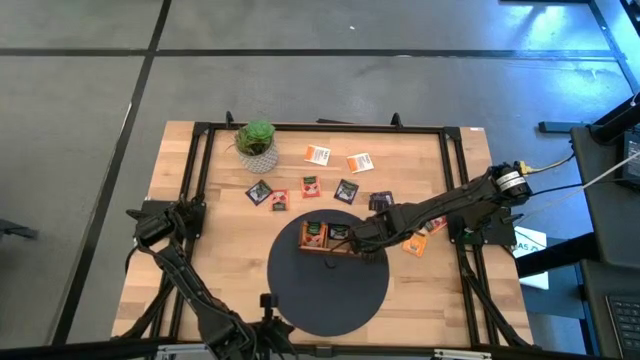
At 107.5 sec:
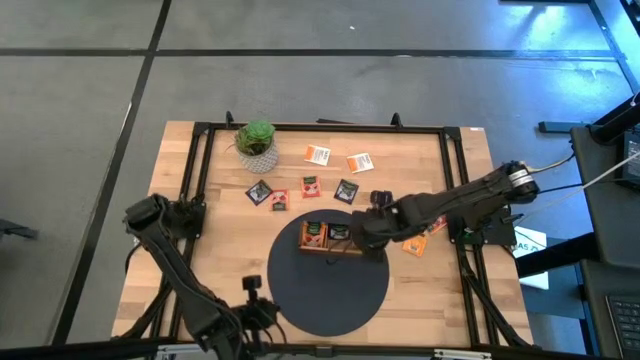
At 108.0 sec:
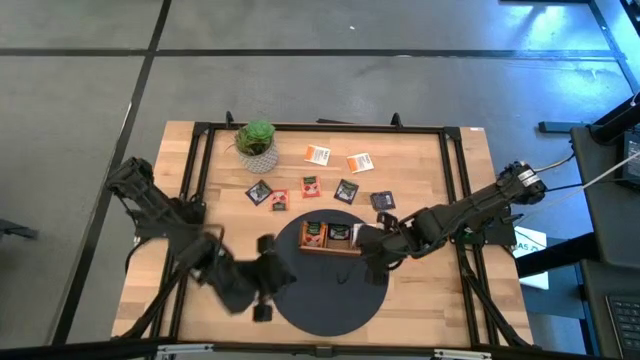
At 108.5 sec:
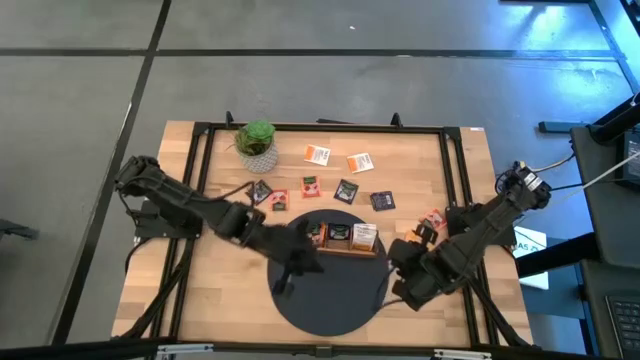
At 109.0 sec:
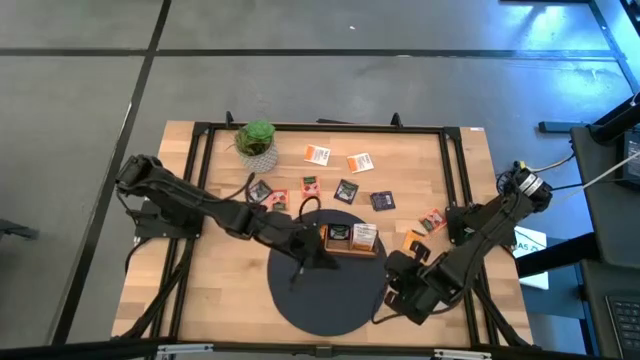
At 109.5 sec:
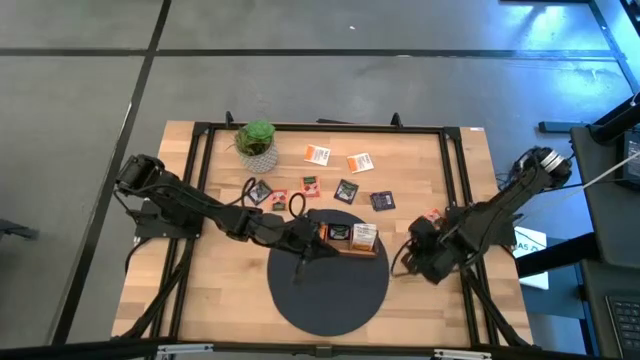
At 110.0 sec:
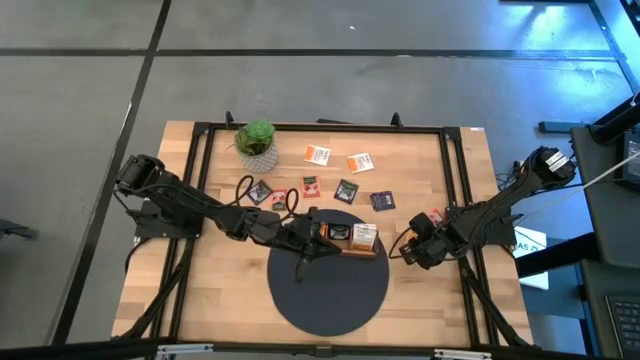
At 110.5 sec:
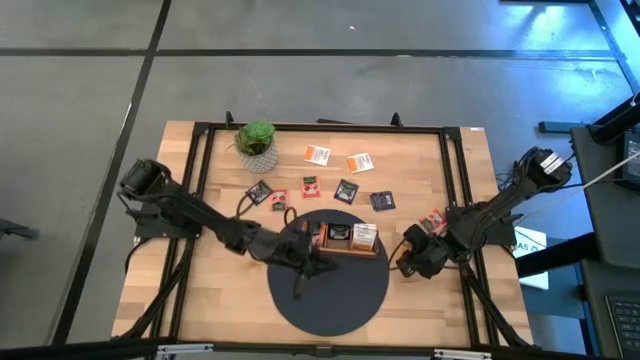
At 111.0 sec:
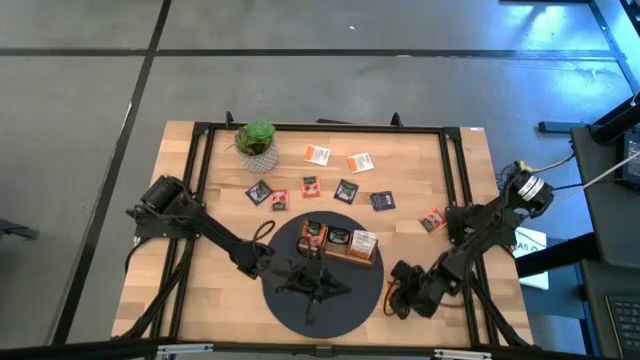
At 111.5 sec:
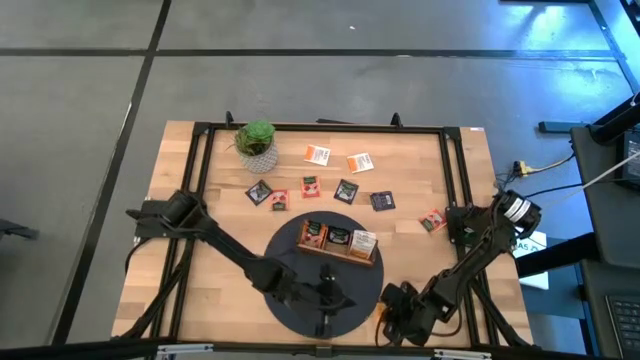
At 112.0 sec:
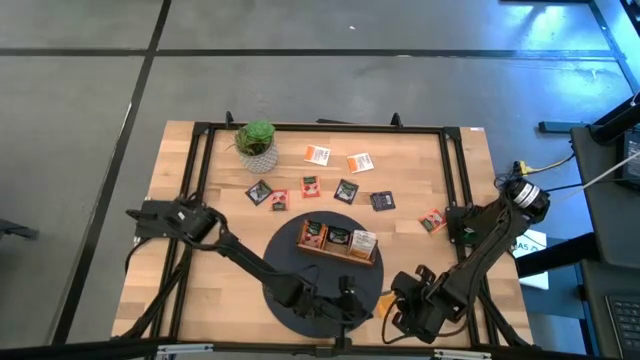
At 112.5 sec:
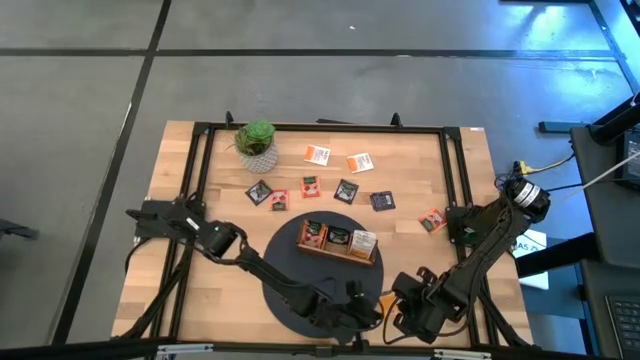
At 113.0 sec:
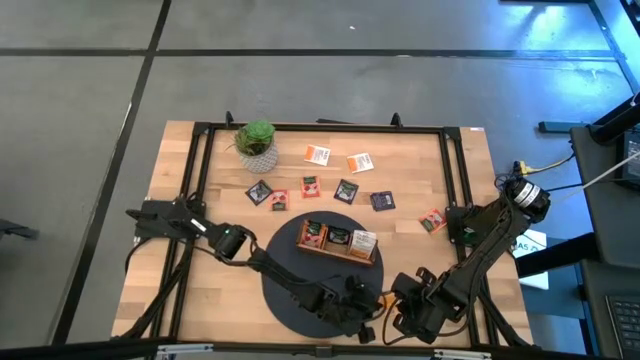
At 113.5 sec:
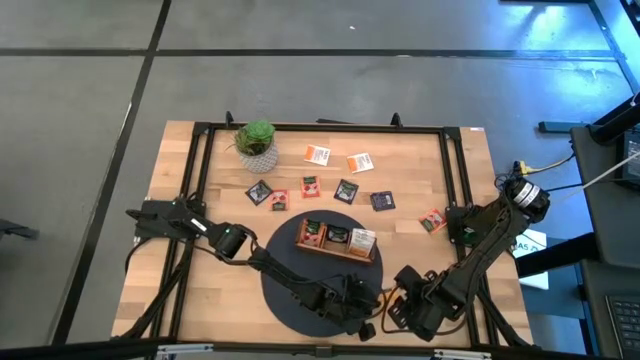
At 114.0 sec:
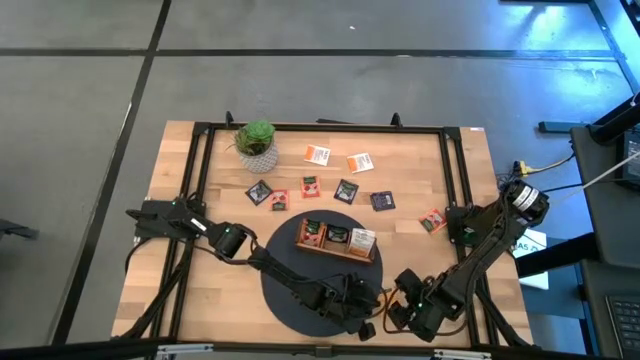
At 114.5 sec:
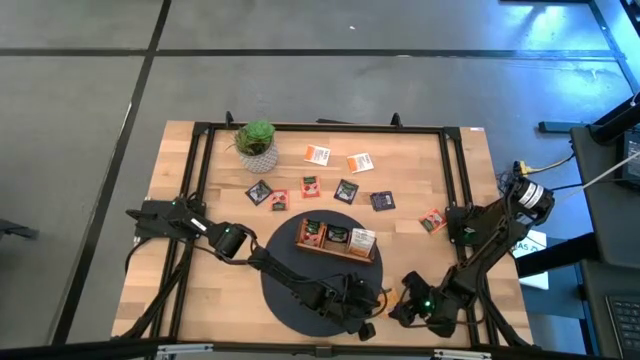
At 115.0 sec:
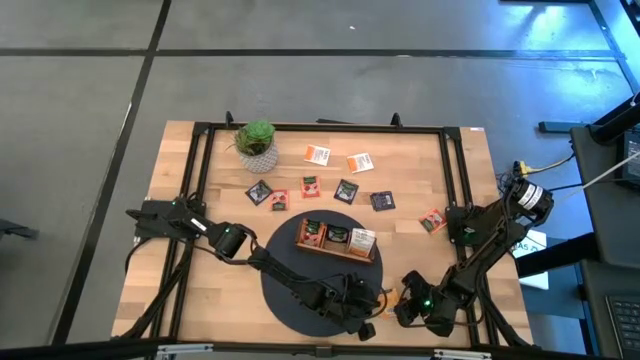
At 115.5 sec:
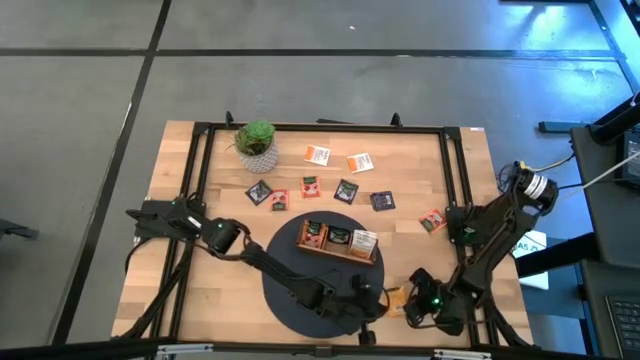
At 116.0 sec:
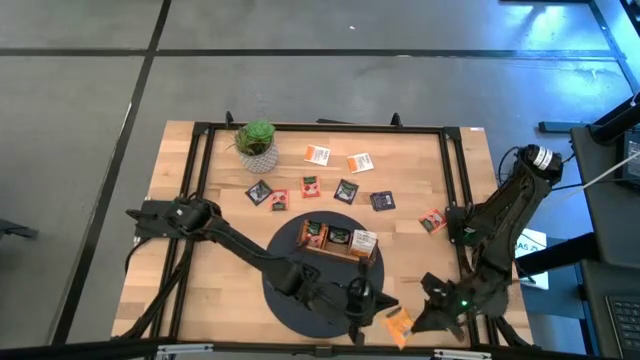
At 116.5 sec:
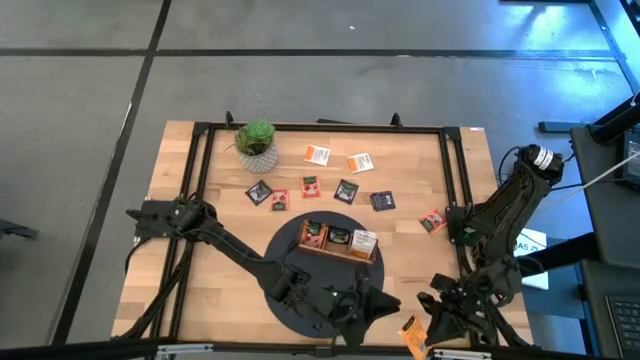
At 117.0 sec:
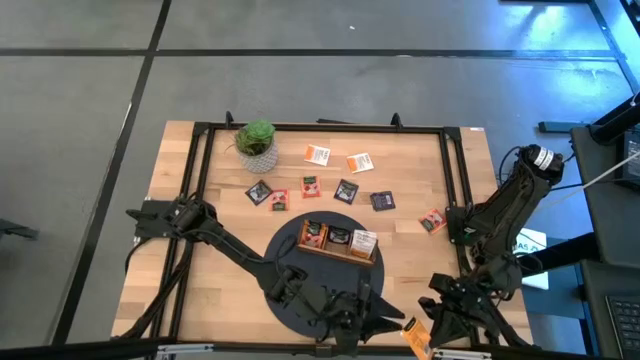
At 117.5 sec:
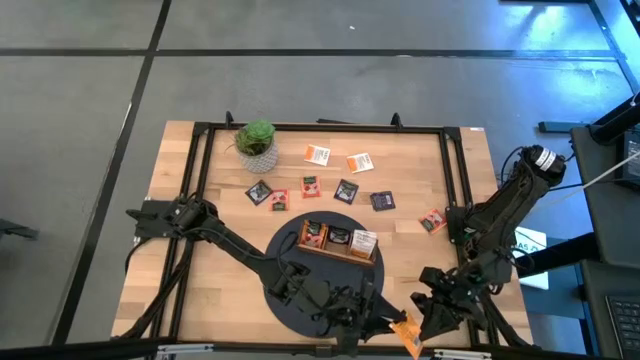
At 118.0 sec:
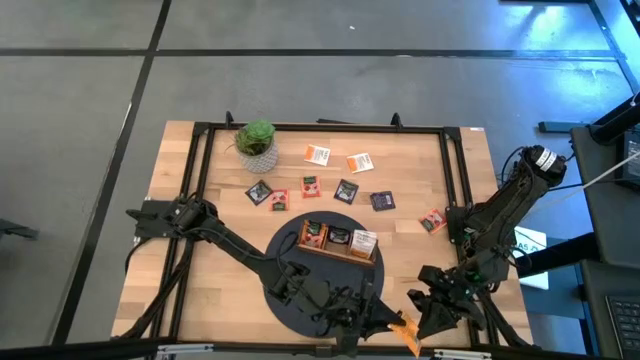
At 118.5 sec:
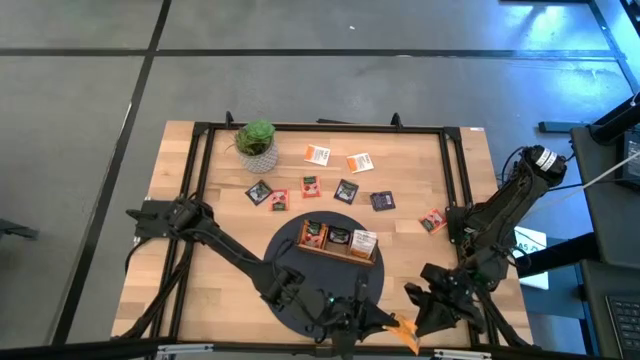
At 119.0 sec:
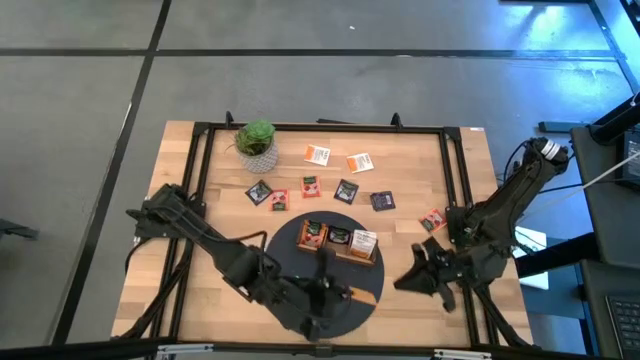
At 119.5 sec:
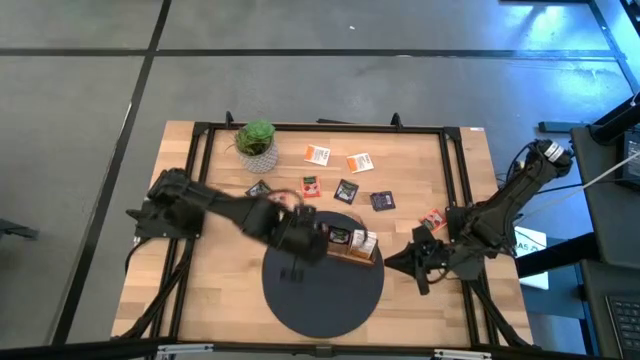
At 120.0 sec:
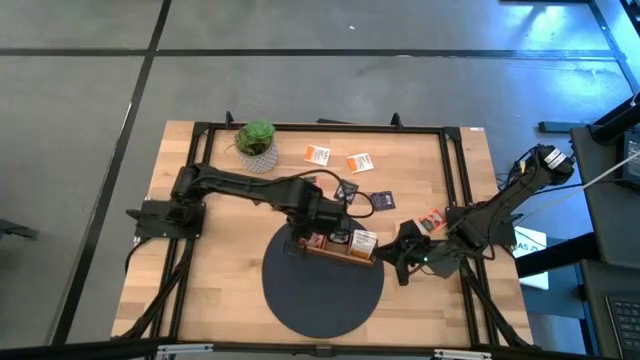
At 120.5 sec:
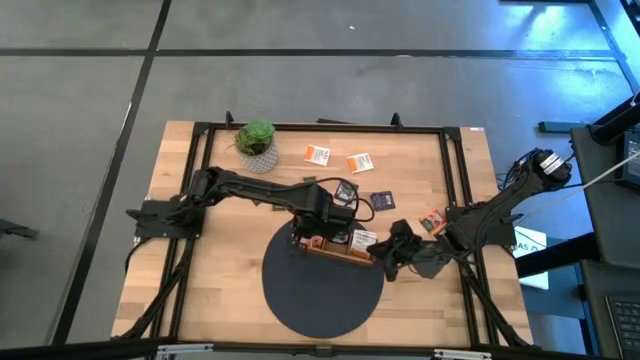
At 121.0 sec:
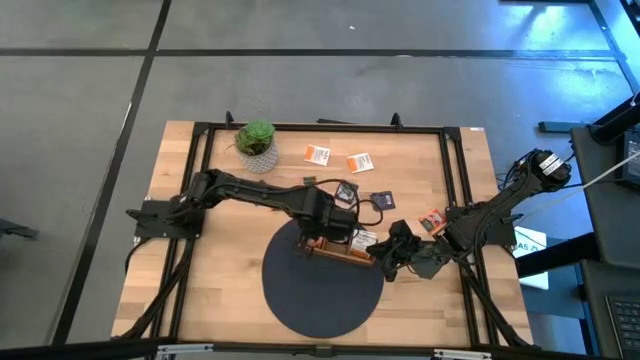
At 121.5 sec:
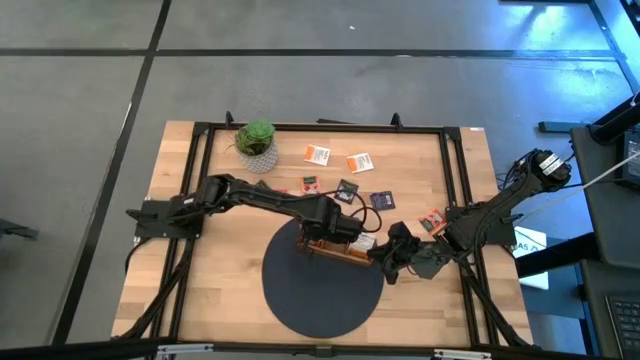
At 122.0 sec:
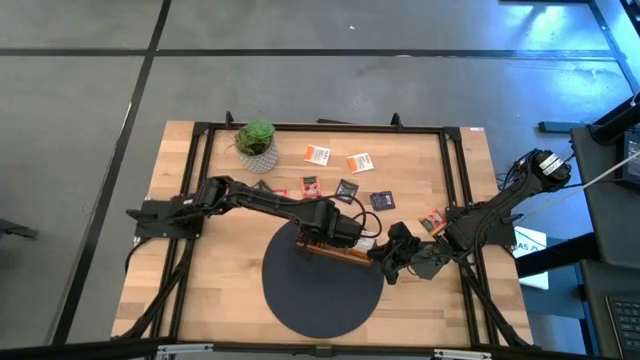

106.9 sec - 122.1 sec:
Task: Pick & Place Tea
Put the orange tea bag into the left slot of the wooden organizer

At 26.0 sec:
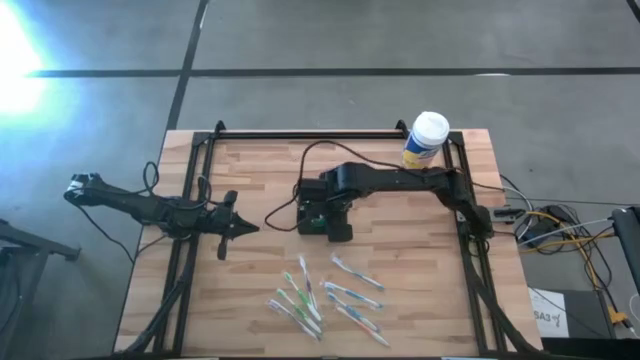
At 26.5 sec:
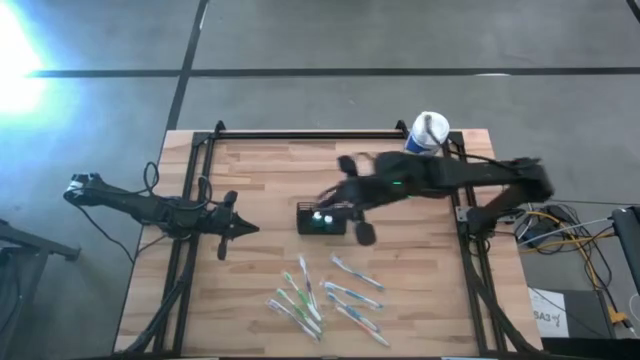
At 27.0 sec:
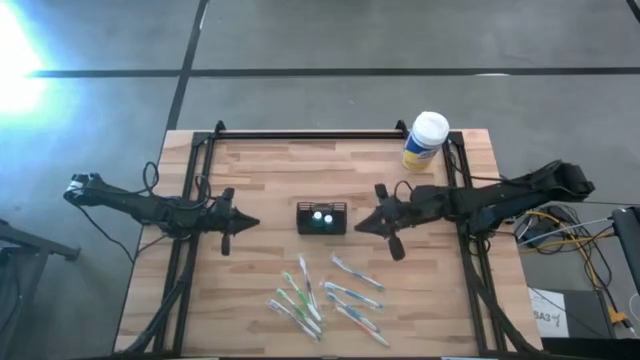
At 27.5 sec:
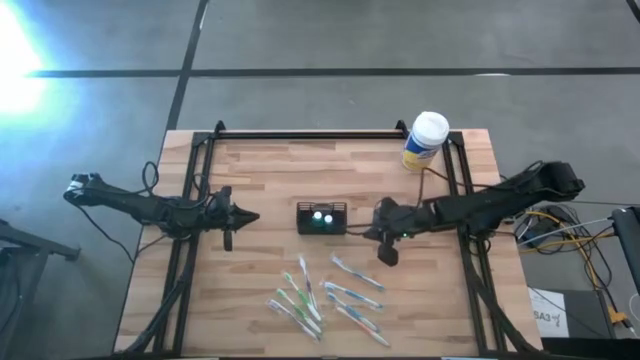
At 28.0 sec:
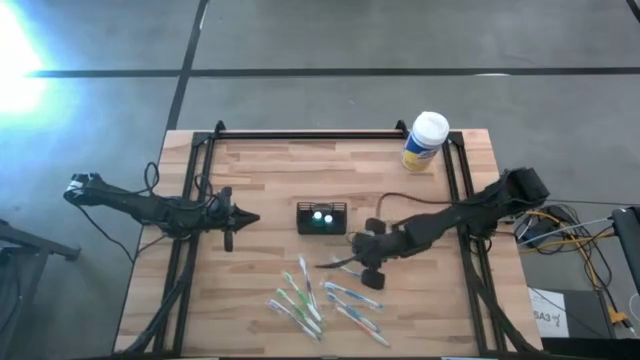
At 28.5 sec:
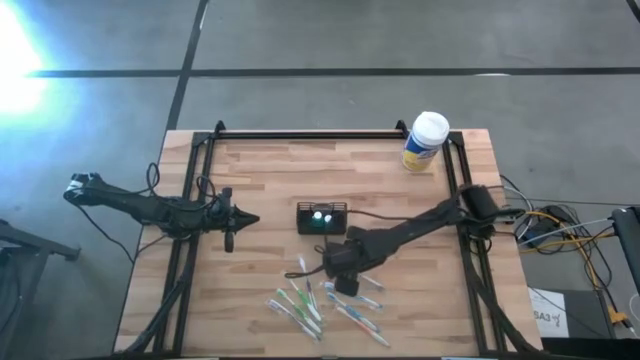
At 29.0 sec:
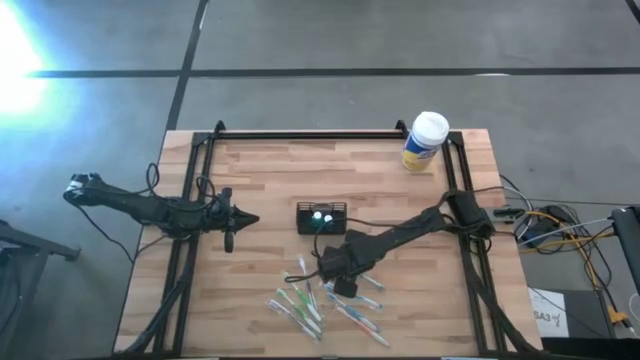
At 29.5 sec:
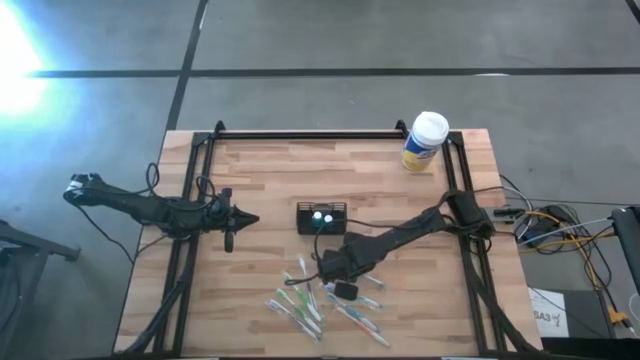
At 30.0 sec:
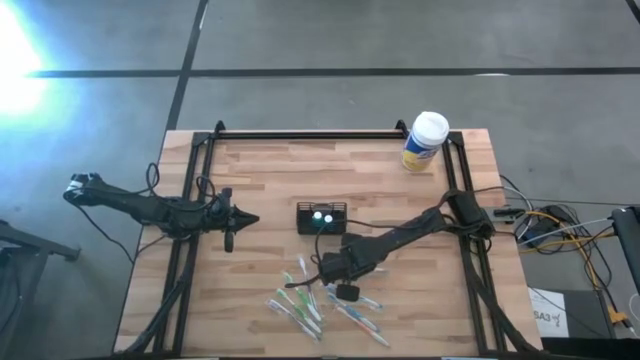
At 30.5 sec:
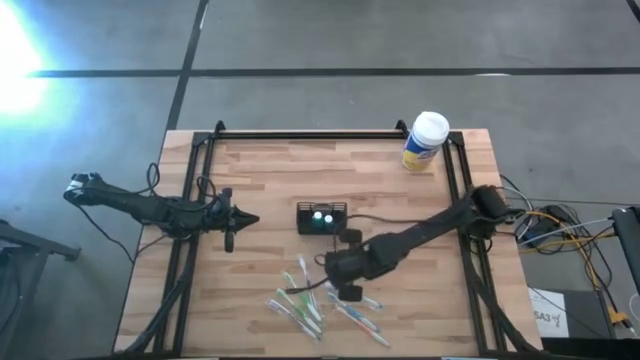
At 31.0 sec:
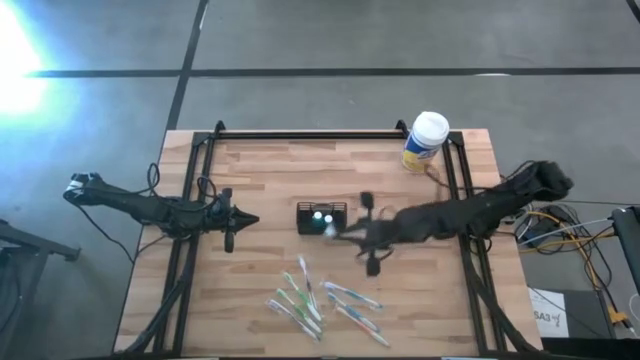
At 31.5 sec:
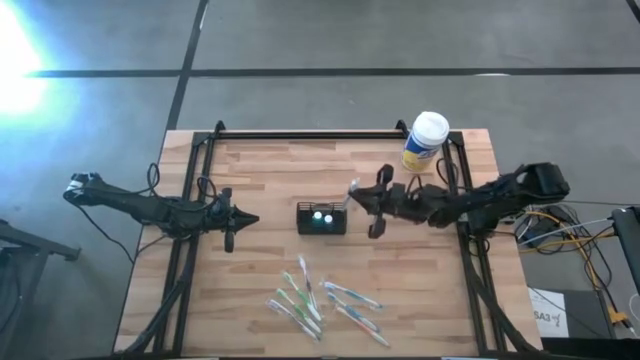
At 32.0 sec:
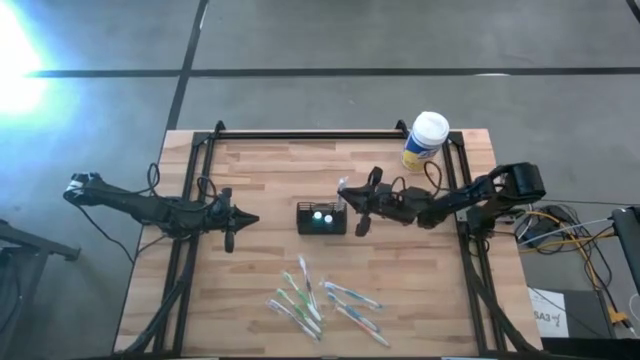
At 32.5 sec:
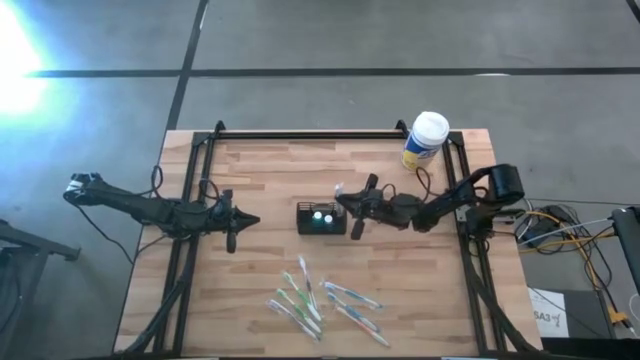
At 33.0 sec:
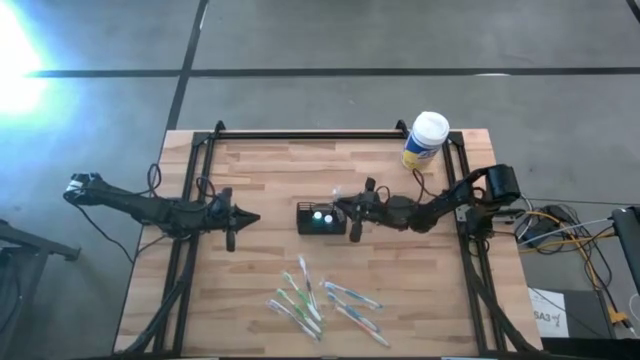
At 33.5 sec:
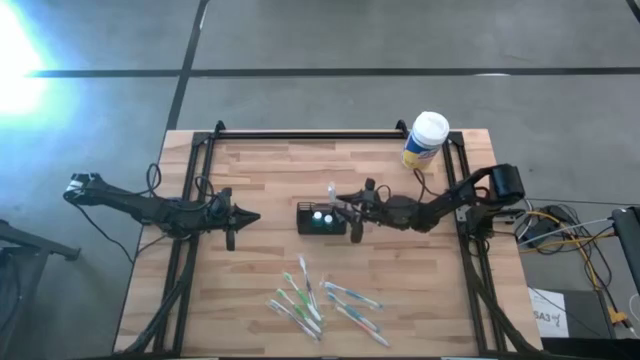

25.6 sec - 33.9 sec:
Task: Pick & Place toothbrushing station
Put the top blue toothbrush into the black mesh organizer
